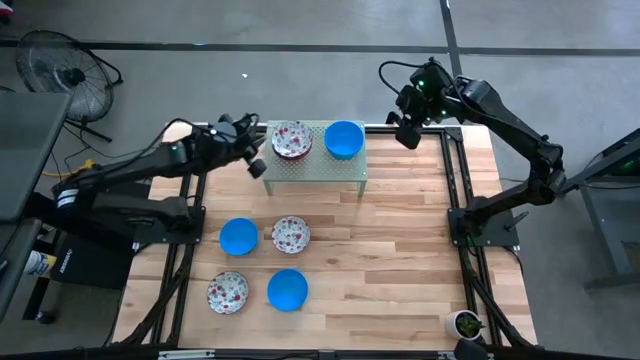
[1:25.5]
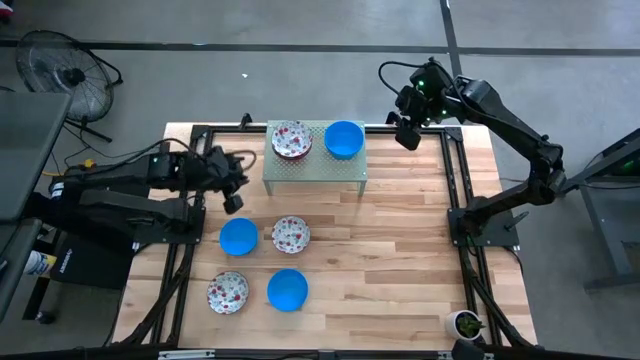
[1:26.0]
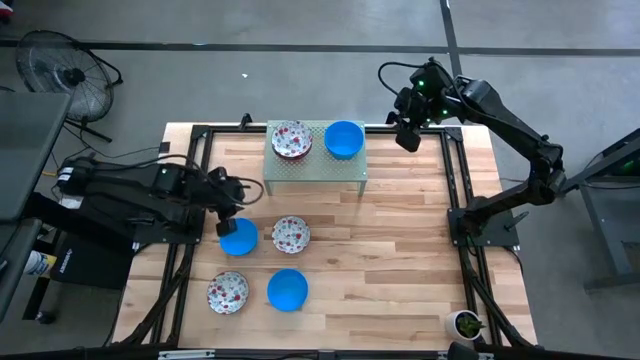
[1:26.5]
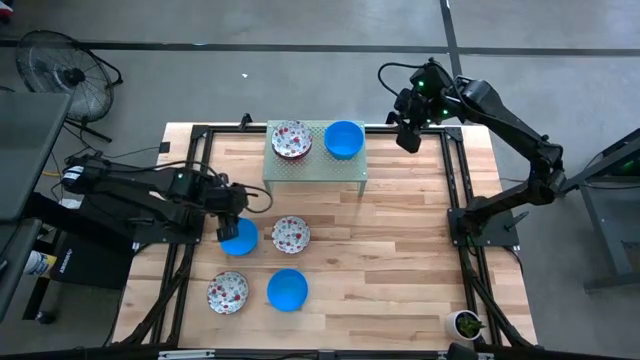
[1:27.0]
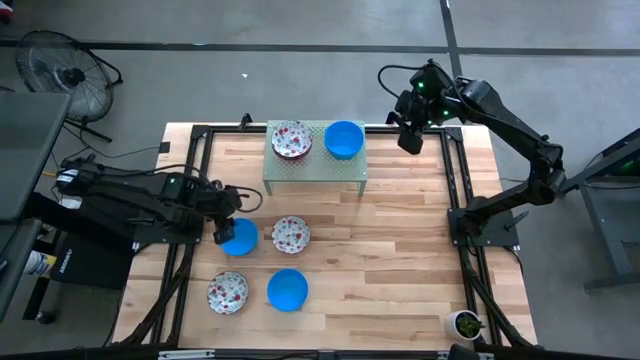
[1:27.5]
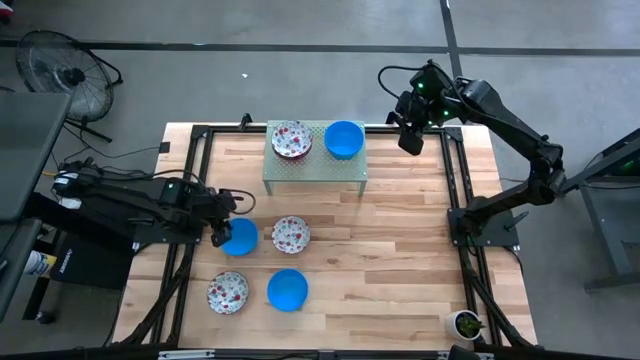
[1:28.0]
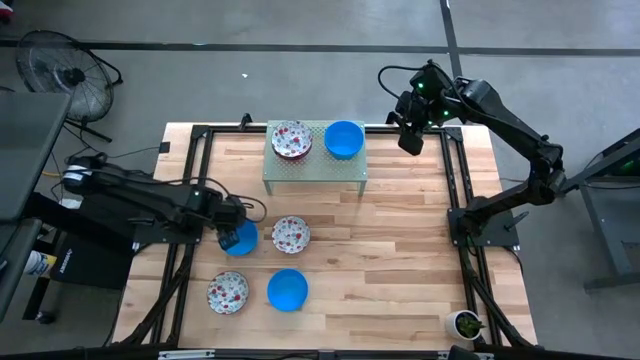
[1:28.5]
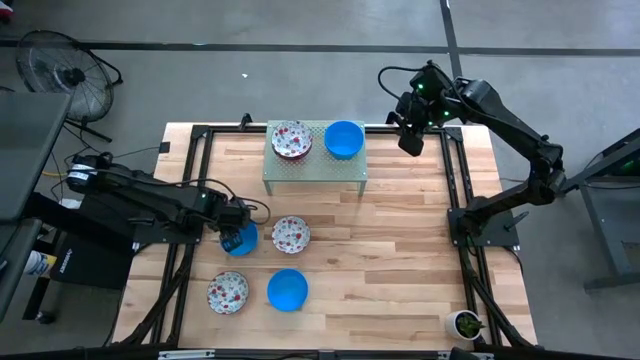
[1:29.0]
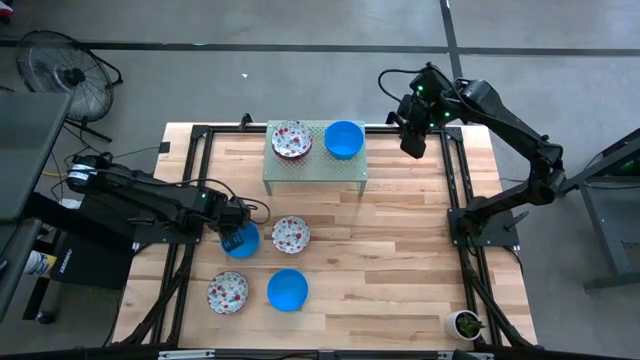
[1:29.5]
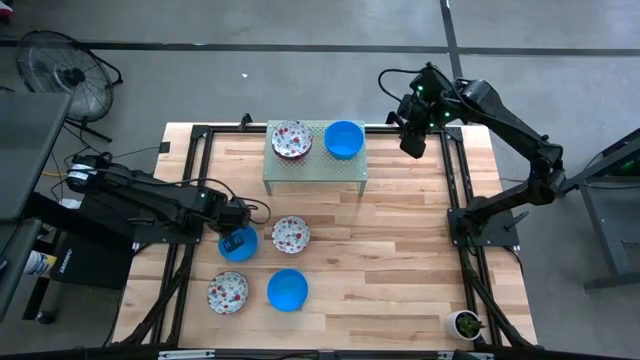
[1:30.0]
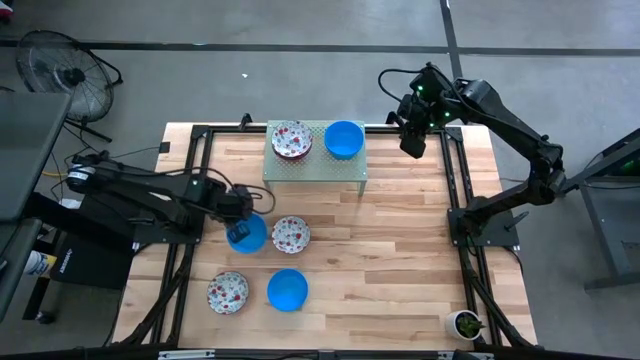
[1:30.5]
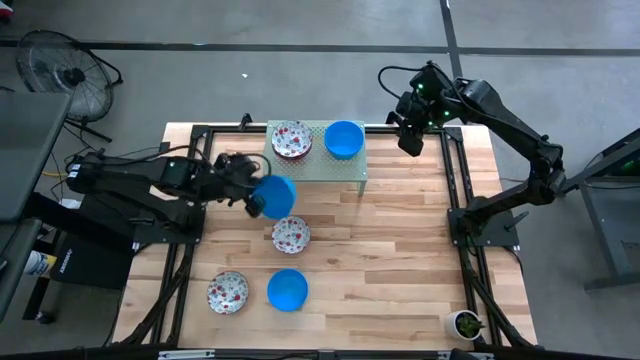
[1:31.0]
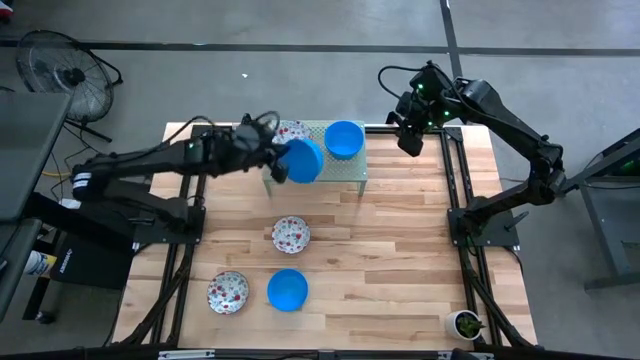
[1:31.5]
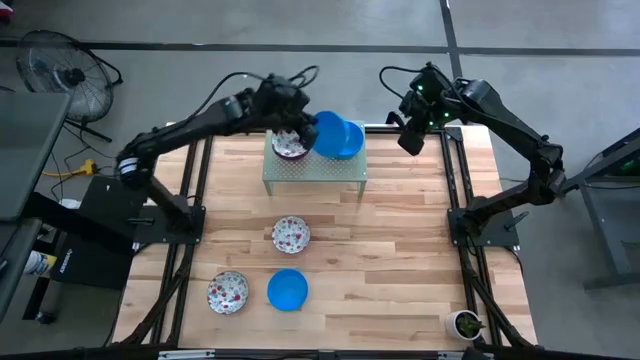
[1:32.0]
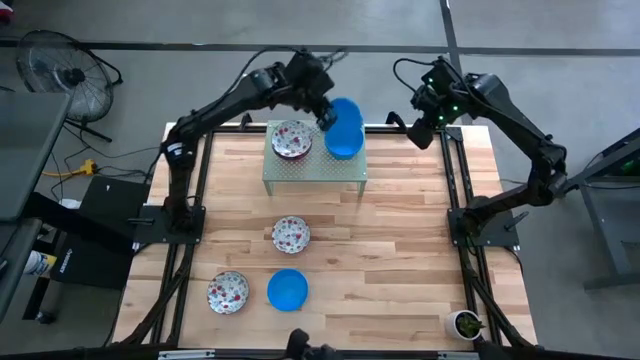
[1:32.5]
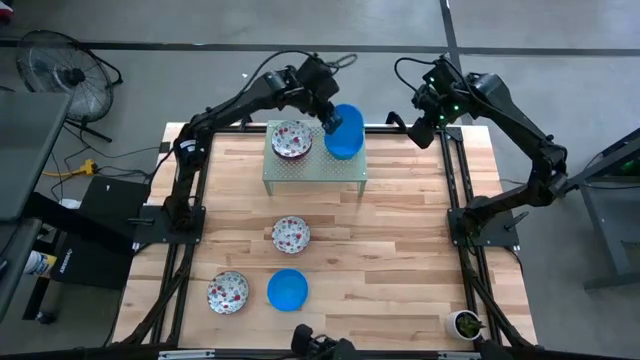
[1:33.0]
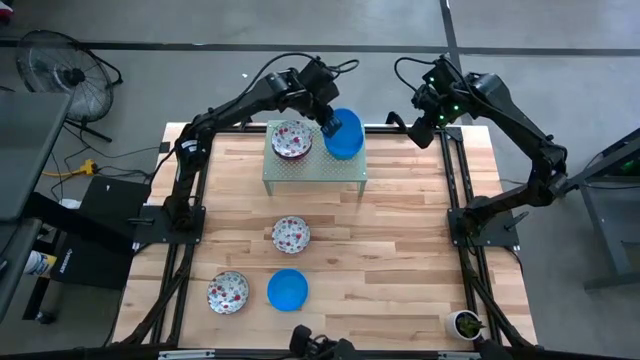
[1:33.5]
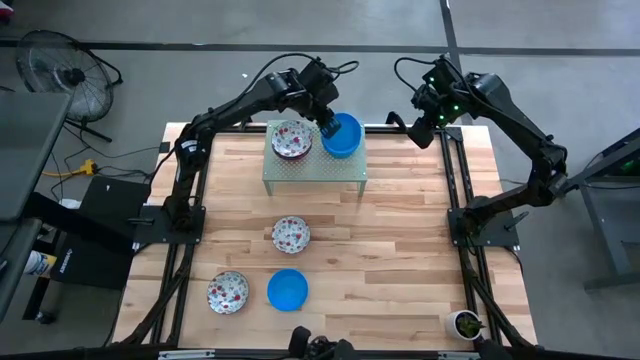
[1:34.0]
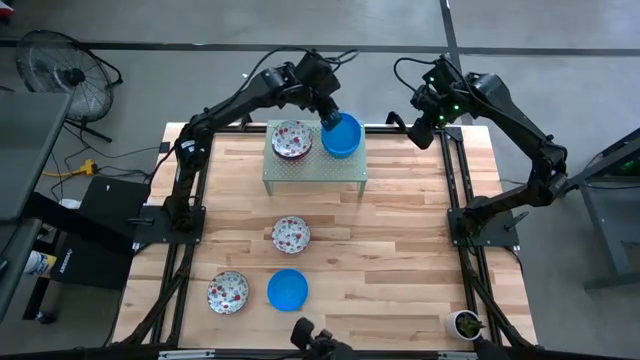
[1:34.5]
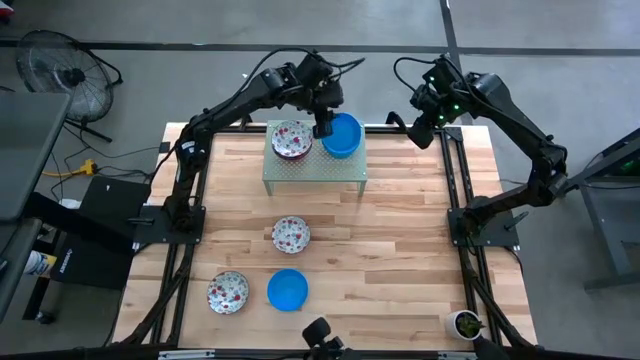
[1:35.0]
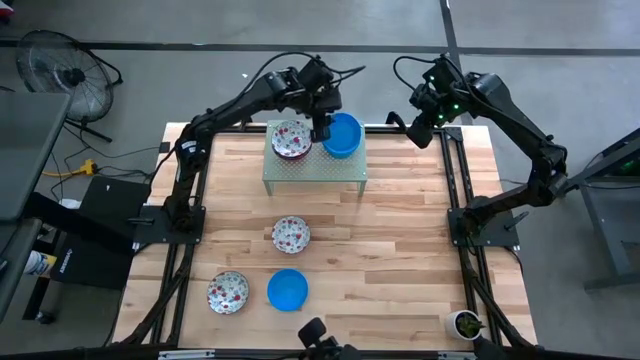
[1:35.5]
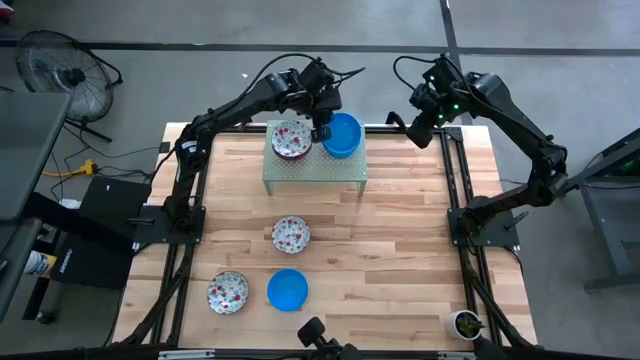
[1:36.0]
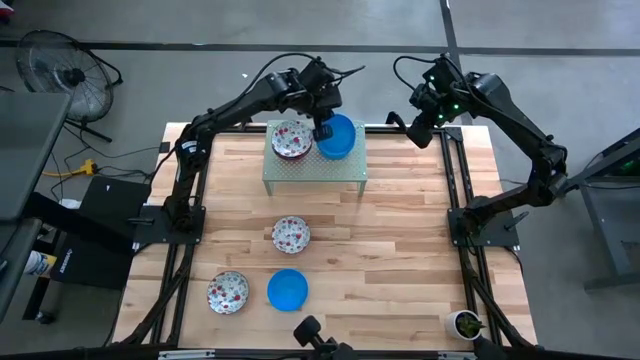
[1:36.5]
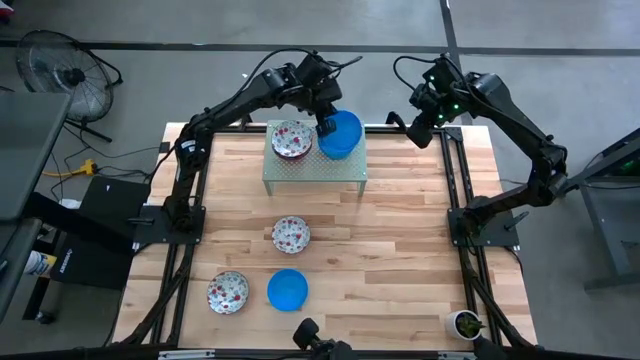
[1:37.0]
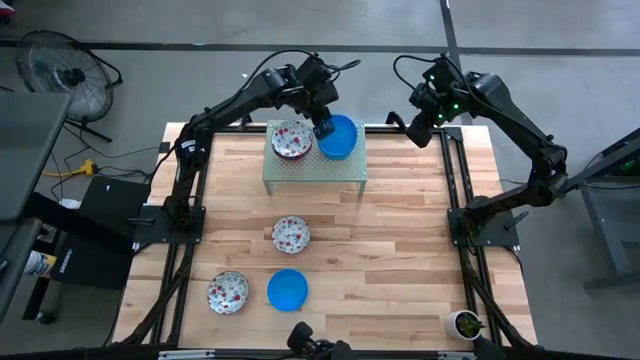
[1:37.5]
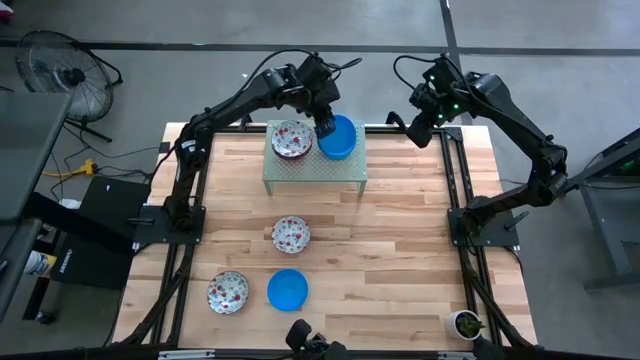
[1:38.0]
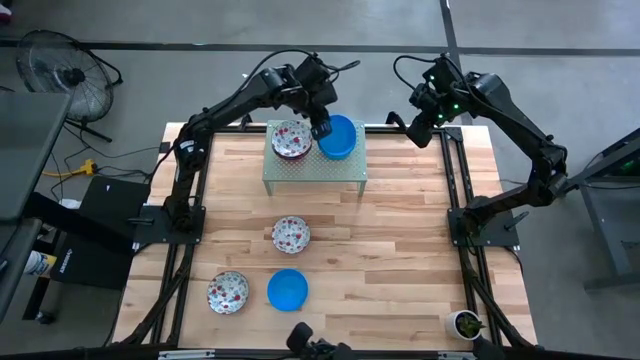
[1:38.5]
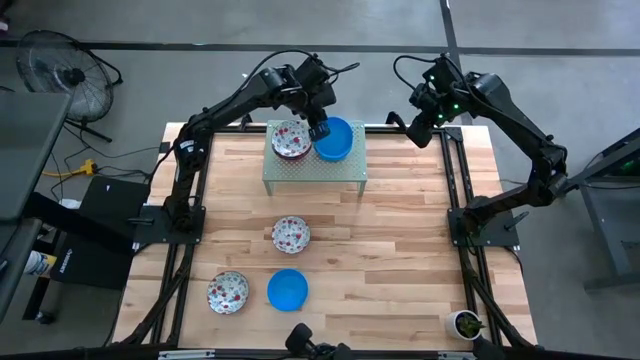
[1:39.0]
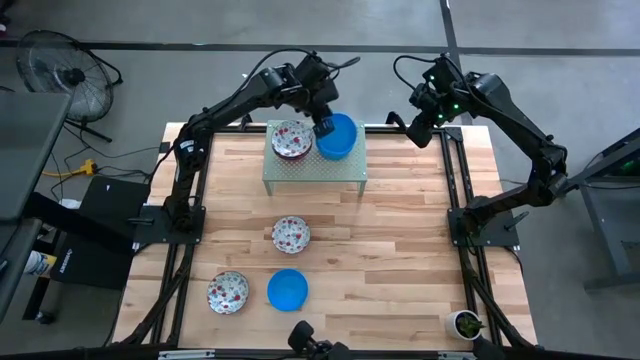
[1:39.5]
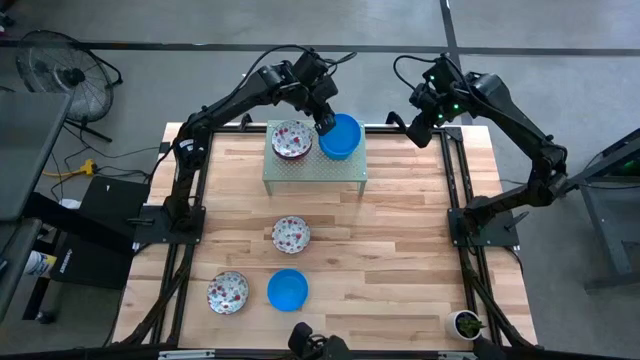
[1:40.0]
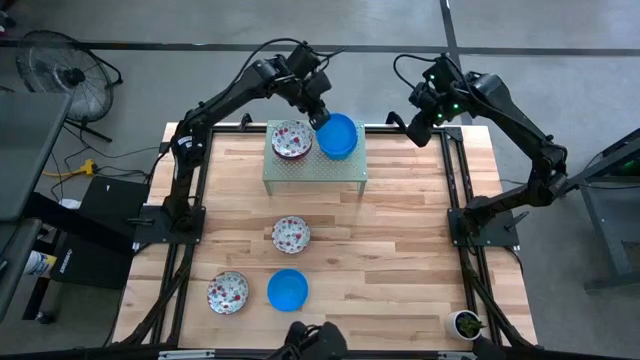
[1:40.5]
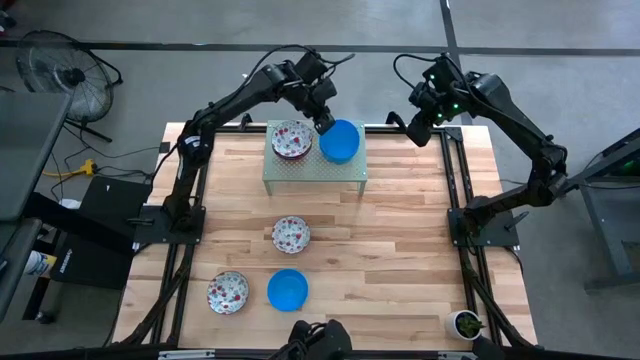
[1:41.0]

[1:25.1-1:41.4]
Task: Pick & Place Mini bowls
Stack the blue bowl on top of the stacked blue bowls on the shelf

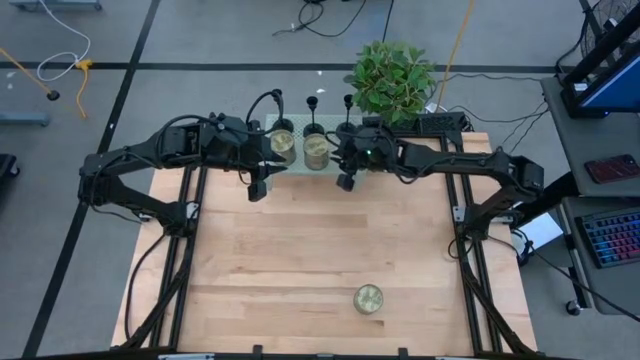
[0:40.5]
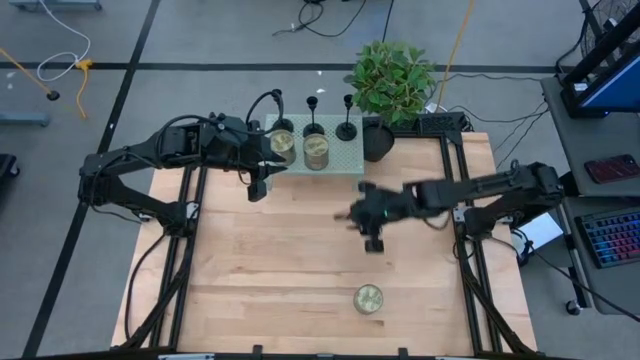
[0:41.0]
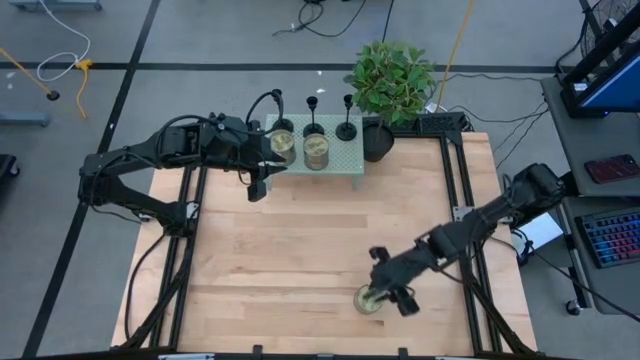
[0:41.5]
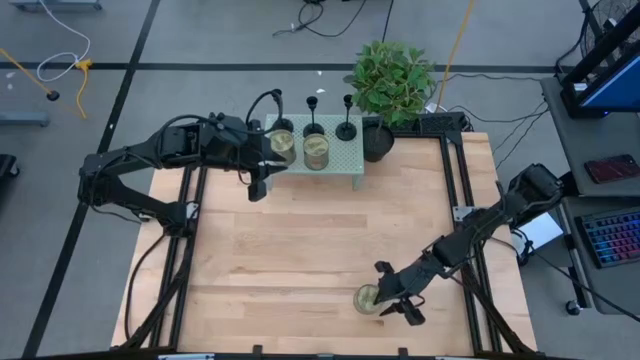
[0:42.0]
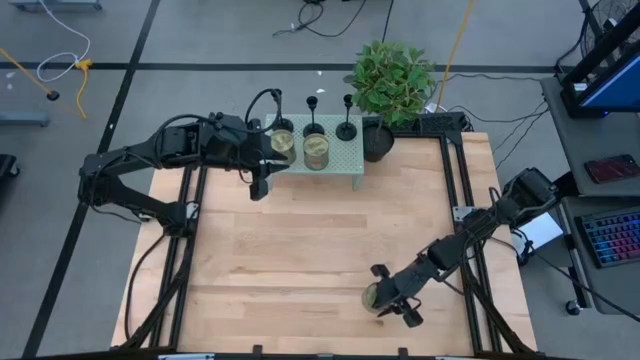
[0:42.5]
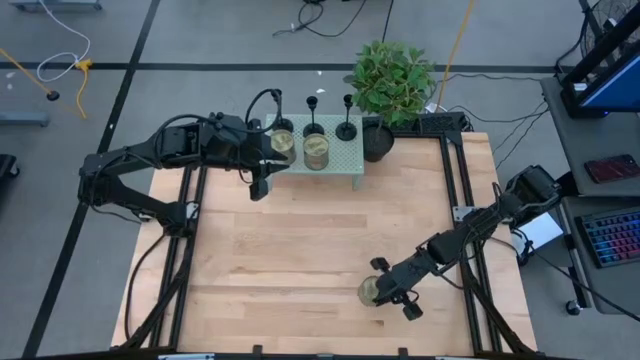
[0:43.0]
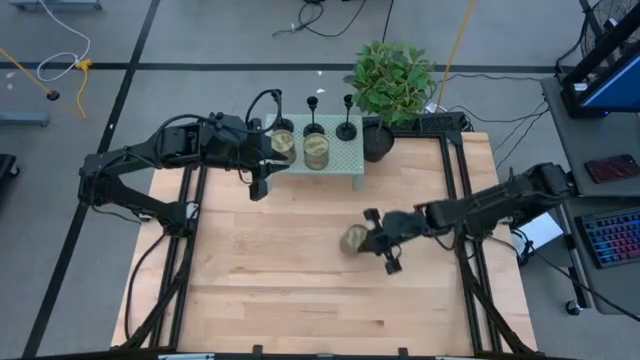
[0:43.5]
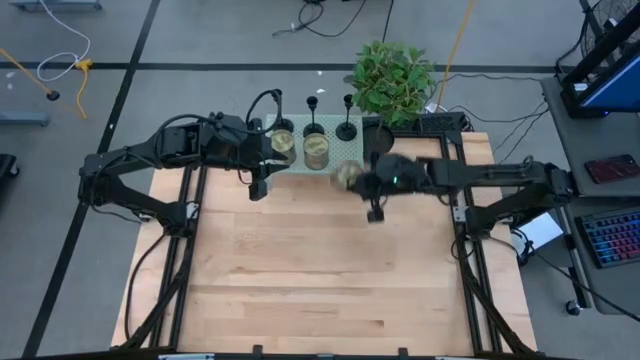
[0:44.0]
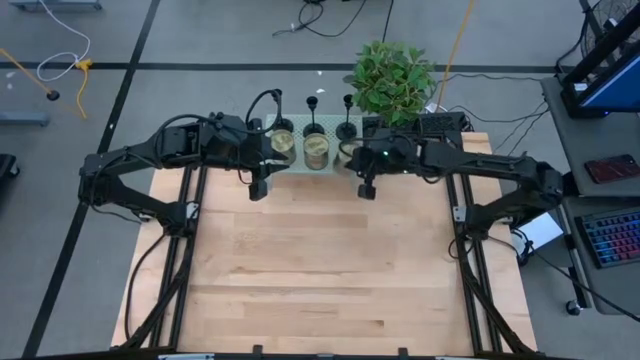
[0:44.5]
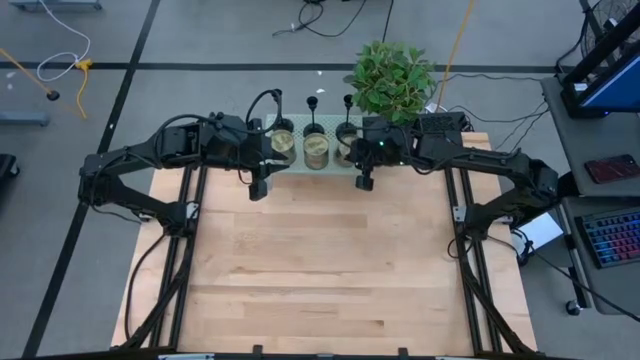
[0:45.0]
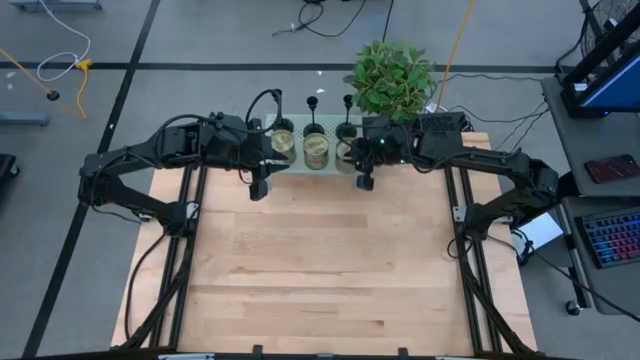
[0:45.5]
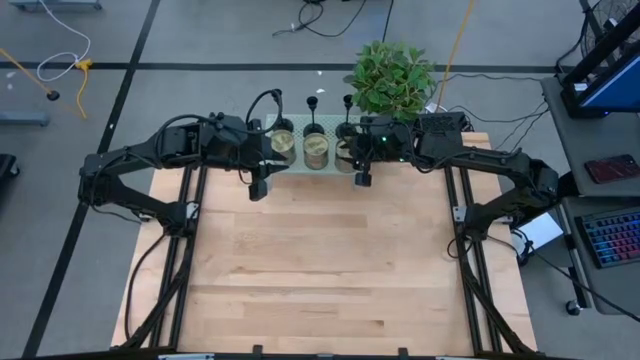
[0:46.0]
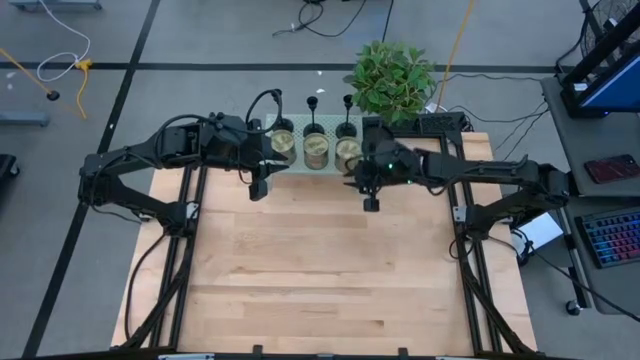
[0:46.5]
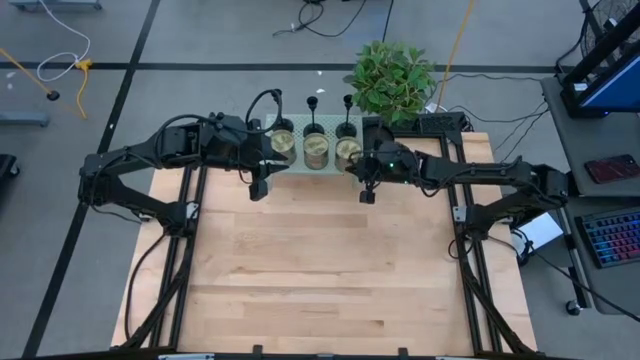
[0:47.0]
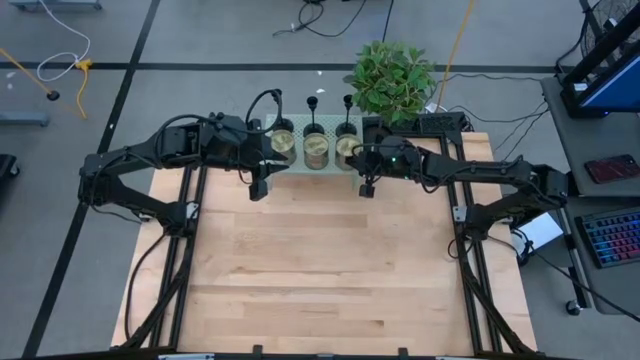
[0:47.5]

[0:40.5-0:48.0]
Task: Pick & Place candle stick holders
Put the scented candle on the shelf aligned with the right candle holder
